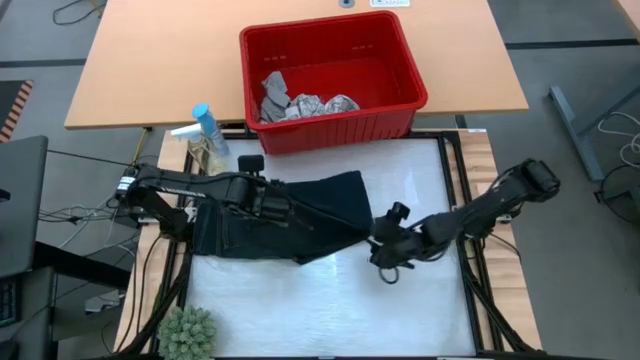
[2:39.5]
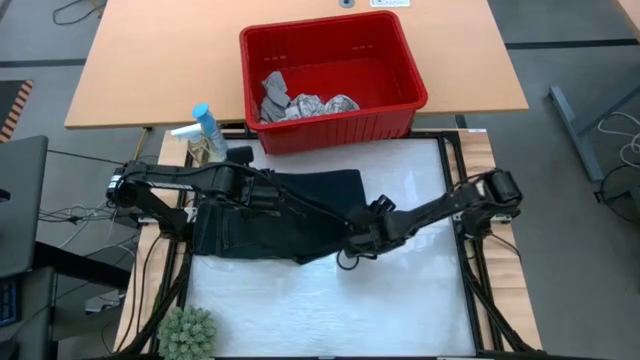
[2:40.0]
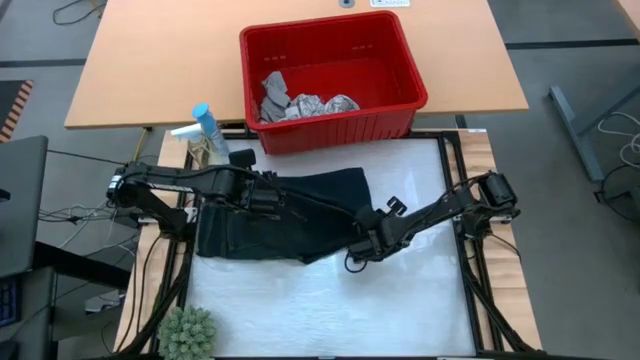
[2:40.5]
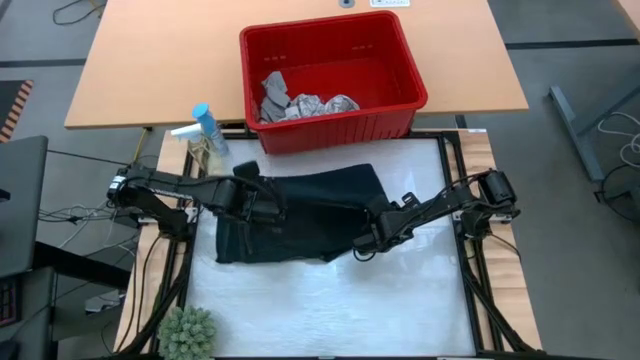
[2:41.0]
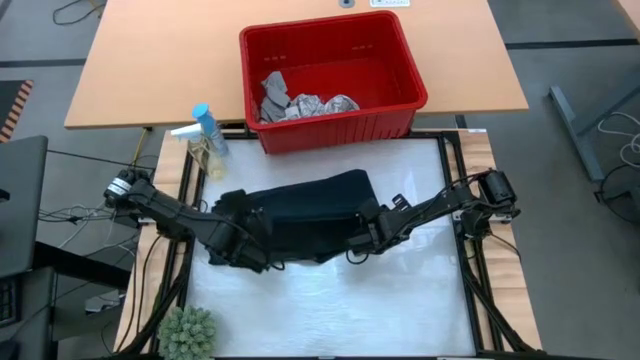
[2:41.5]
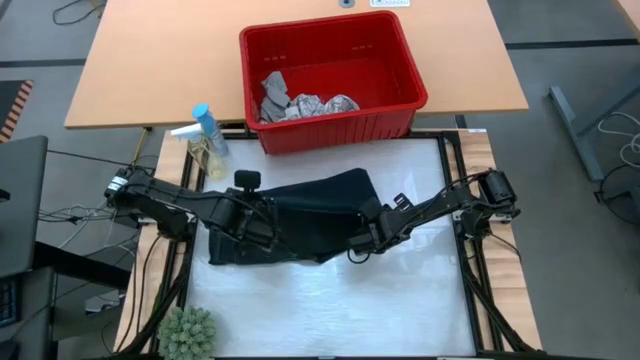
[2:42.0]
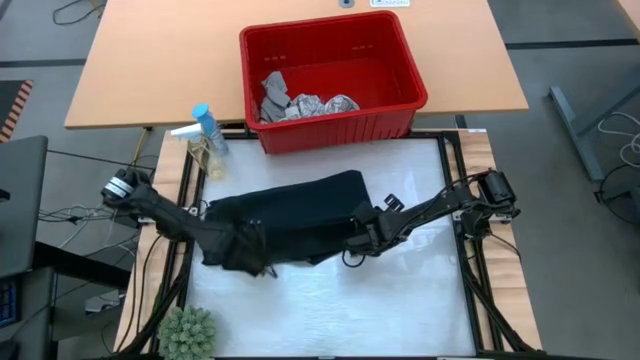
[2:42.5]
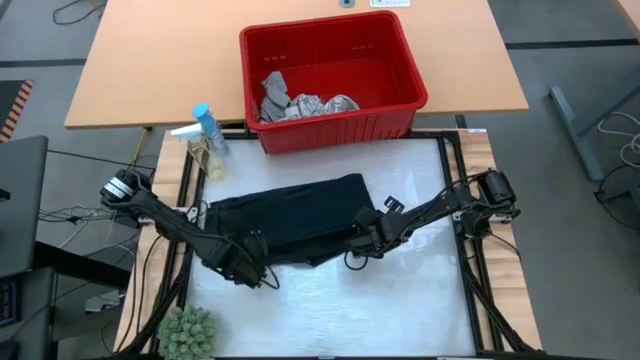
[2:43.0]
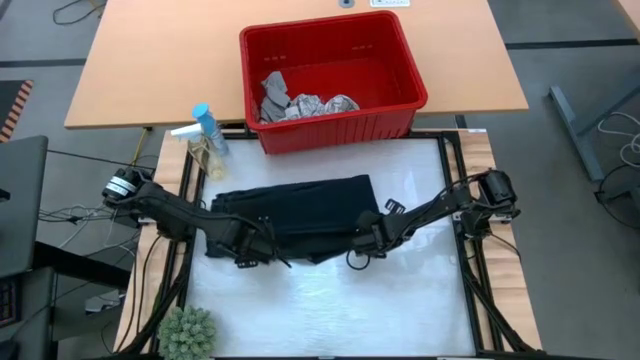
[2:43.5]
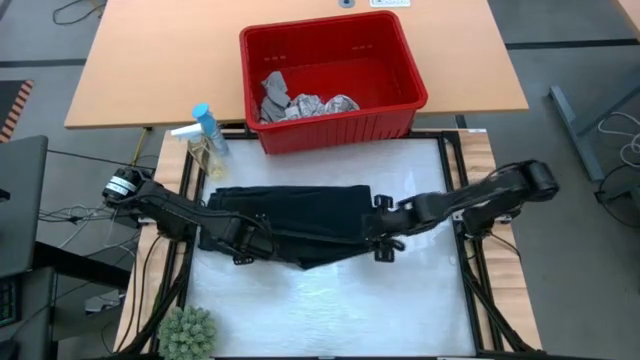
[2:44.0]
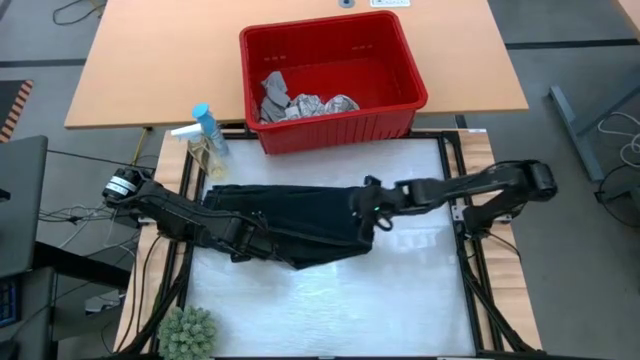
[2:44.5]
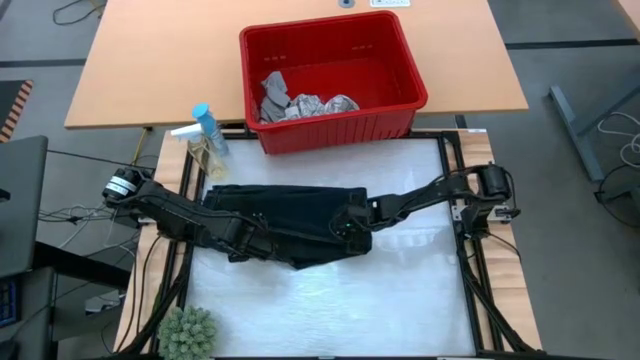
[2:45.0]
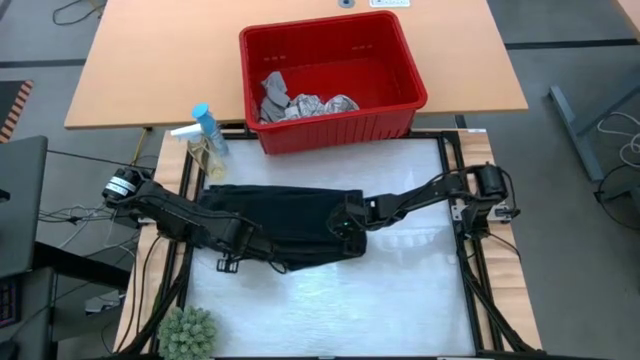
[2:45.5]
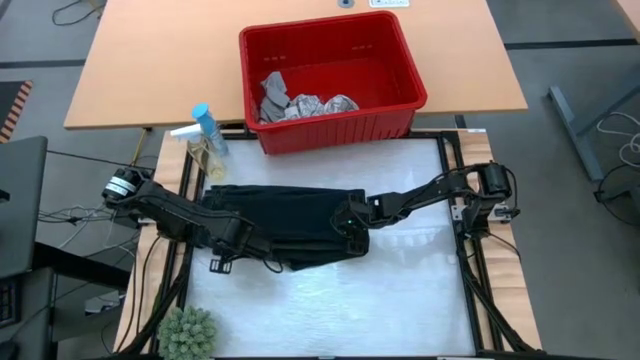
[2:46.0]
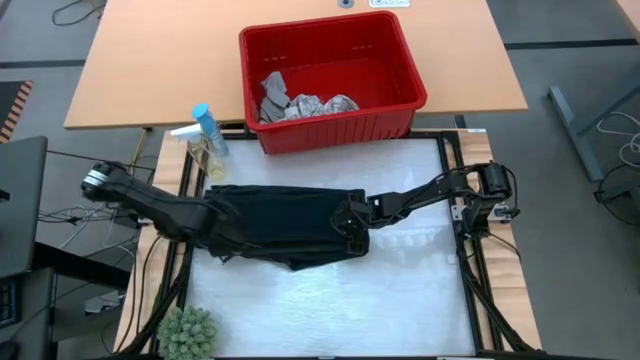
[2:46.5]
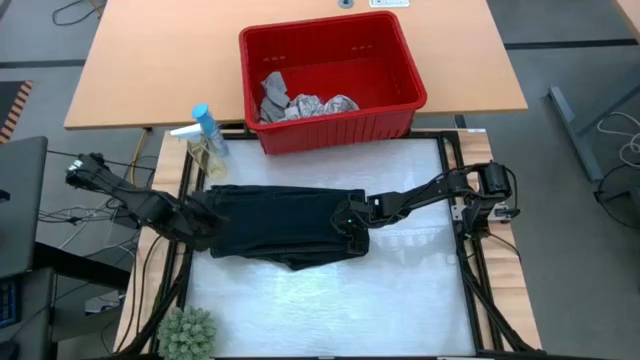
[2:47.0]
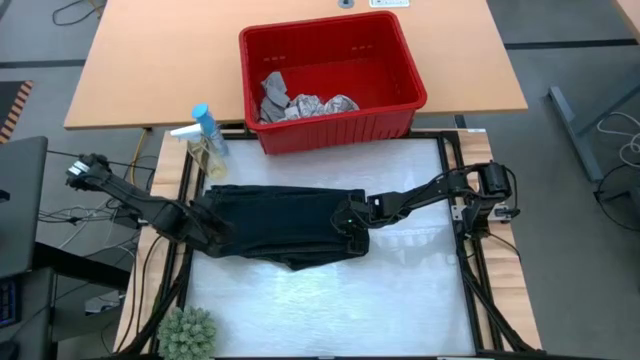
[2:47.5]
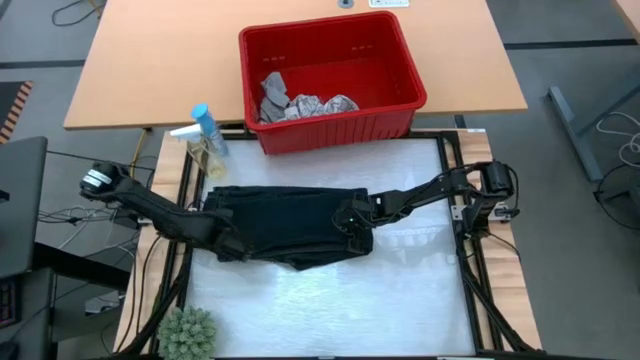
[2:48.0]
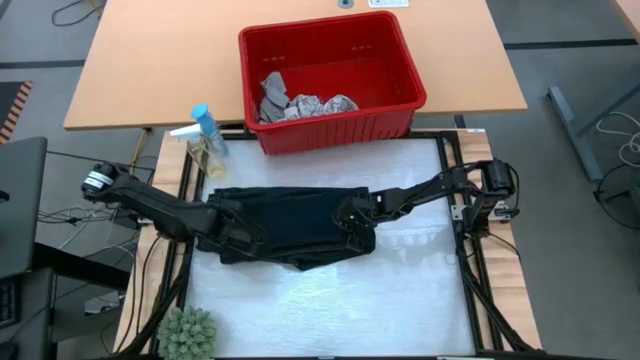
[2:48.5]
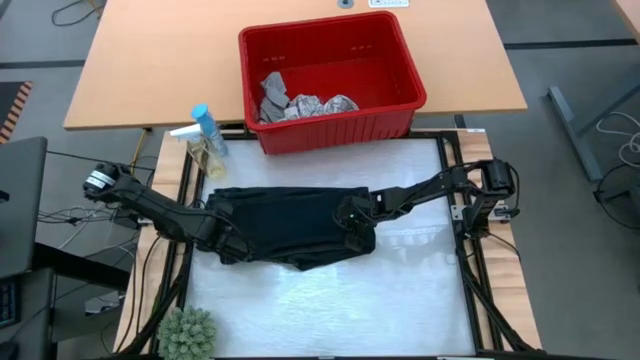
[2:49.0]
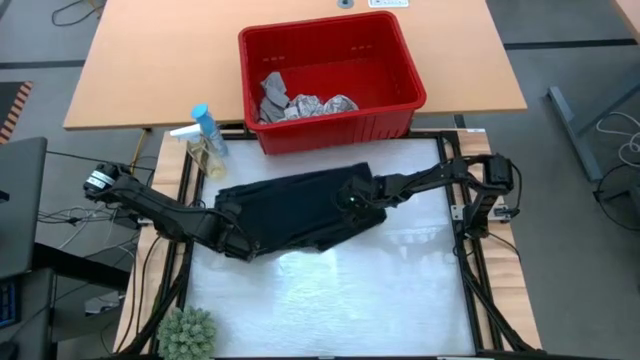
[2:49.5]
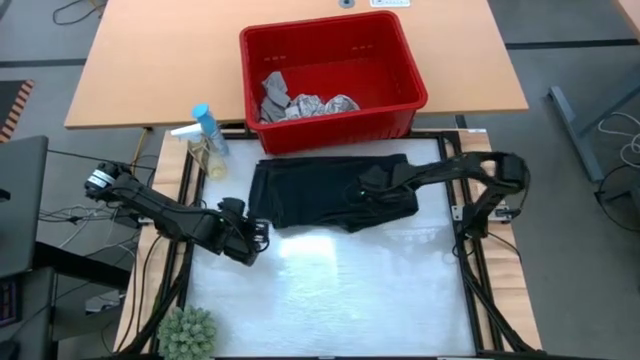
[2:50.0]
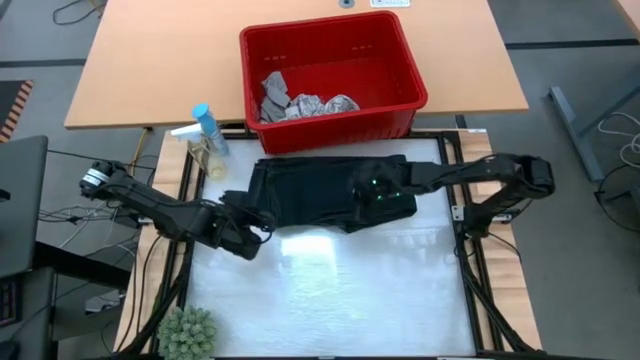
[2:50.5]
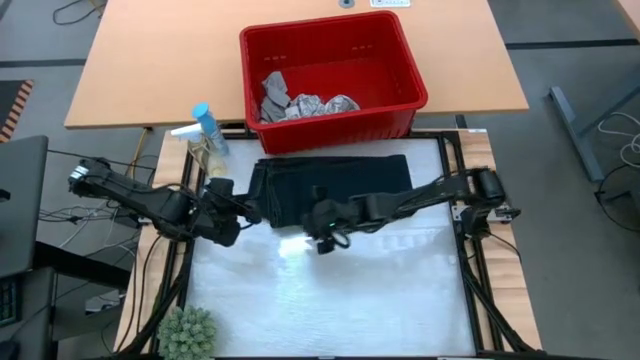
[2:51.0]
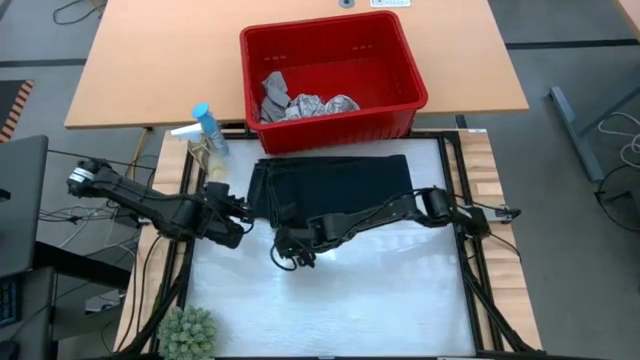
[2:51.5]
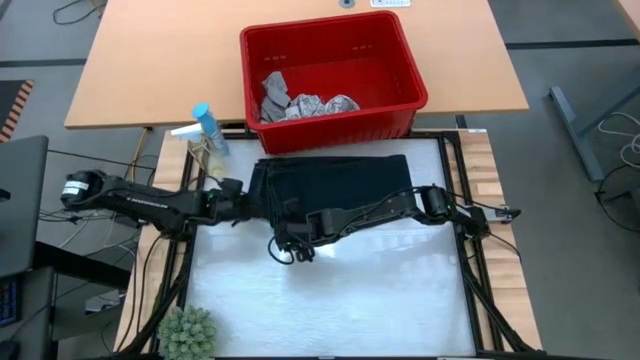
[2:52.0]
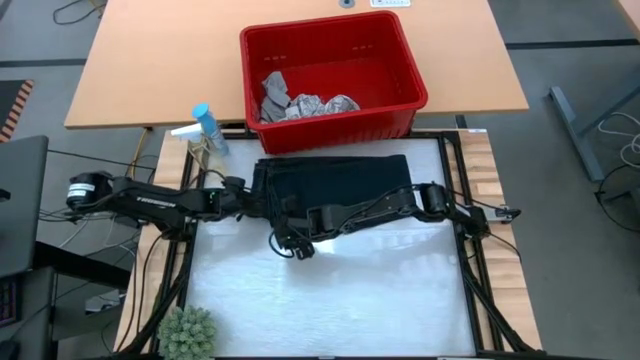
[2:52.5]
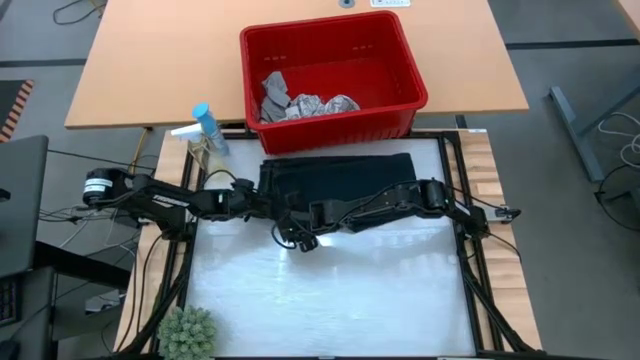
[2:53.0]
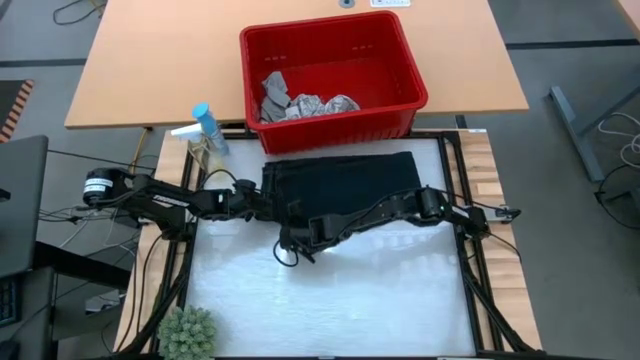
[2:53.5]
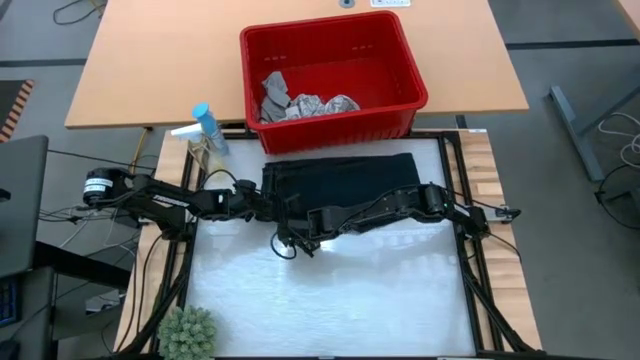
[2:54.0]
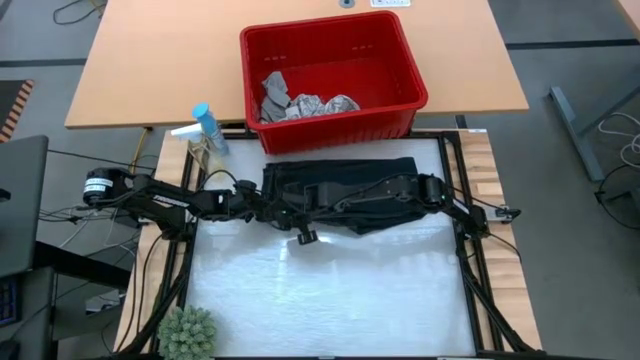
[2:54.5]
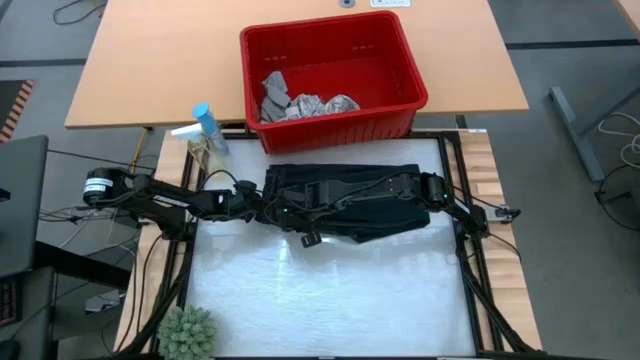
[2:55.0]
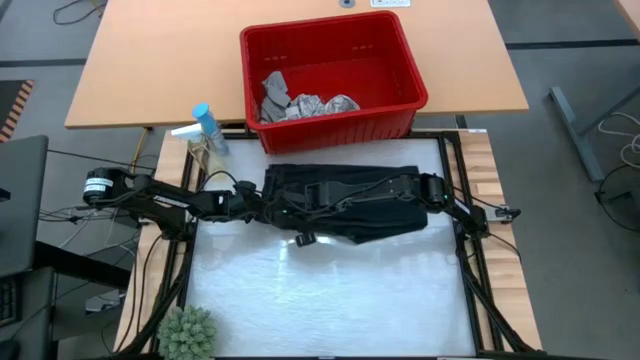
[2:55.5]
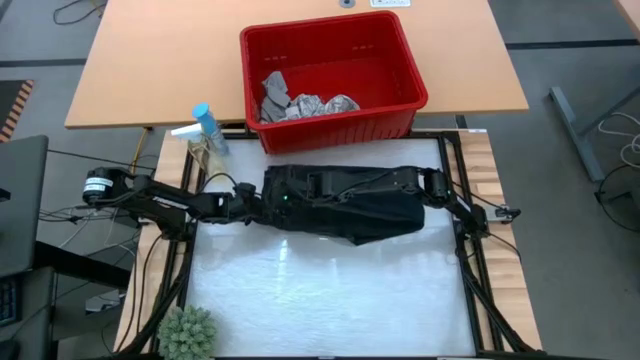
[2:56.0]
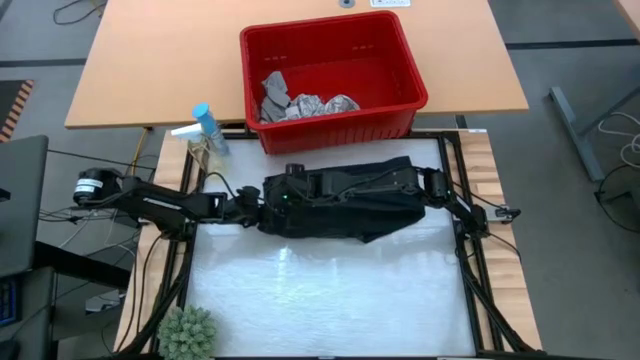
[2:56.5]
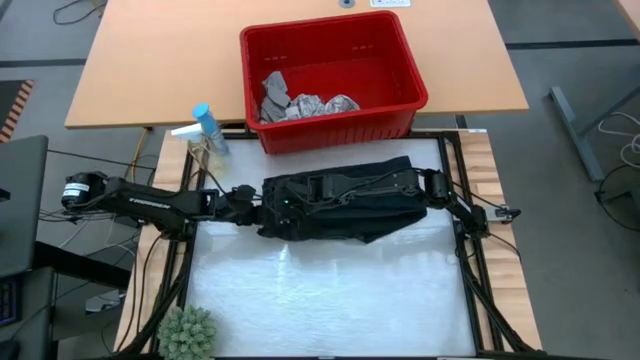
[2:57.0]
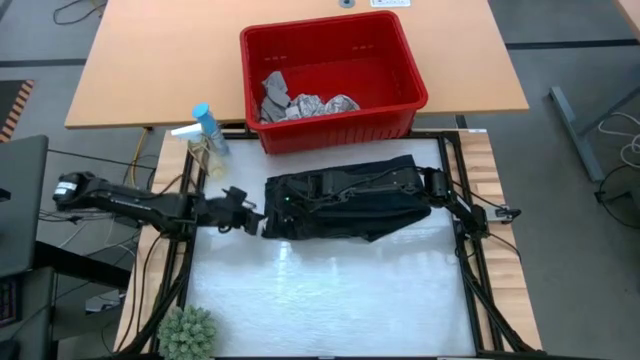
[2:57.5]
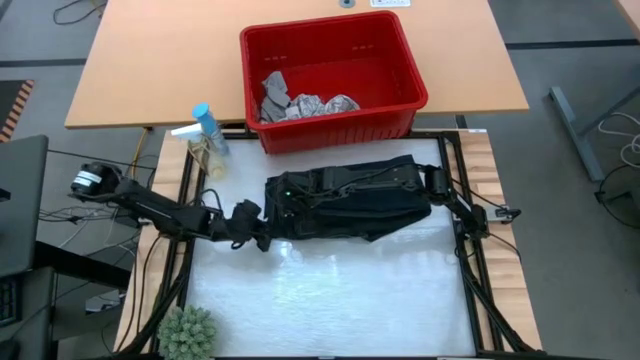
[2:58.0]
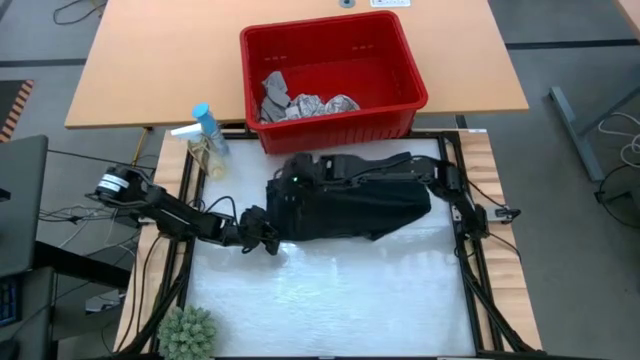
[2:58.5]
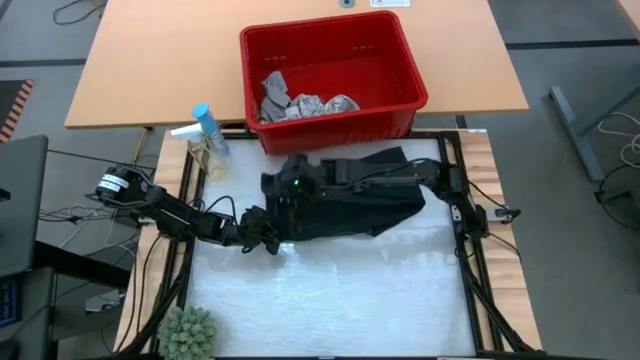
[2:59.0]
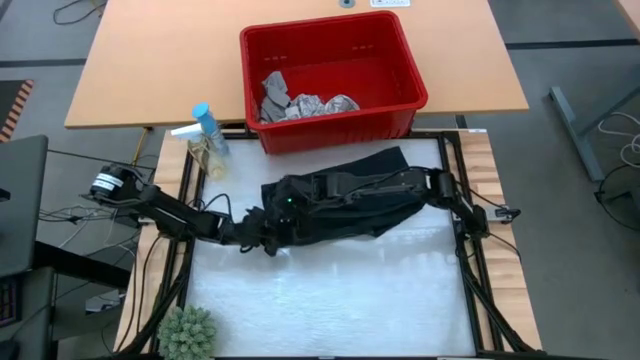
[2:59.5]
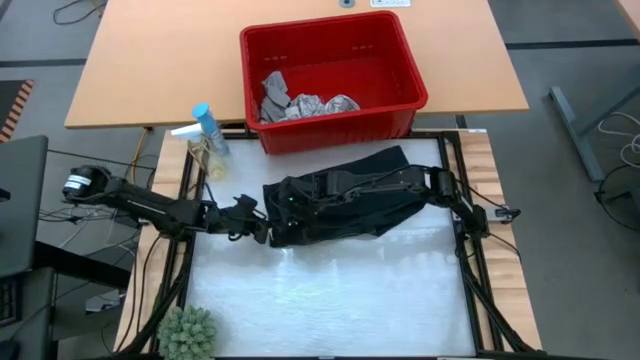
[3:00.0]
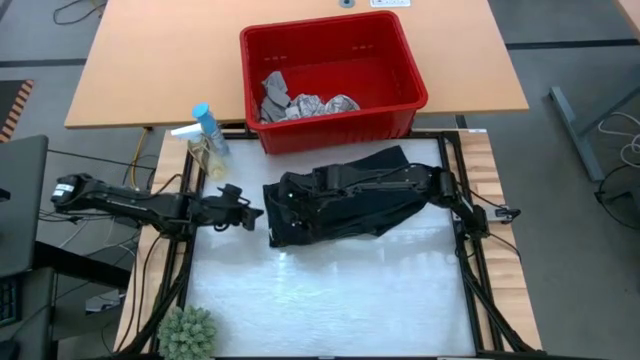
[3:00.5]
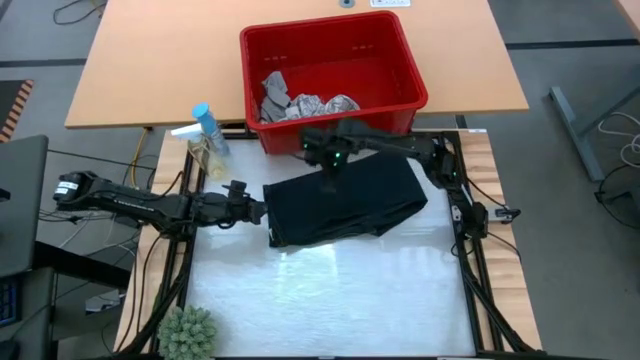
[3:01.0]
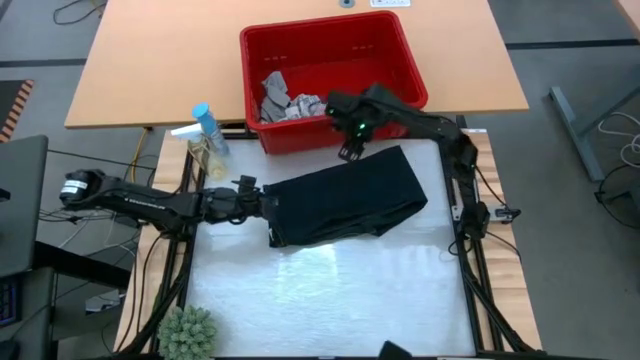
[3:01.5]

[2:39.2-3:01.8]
Task: Fold Laundry from Bin
Fold the blue jeans
